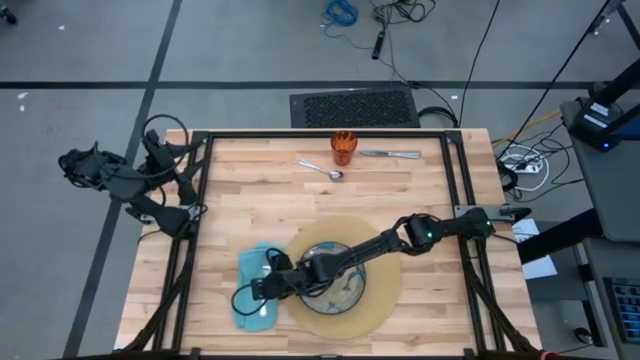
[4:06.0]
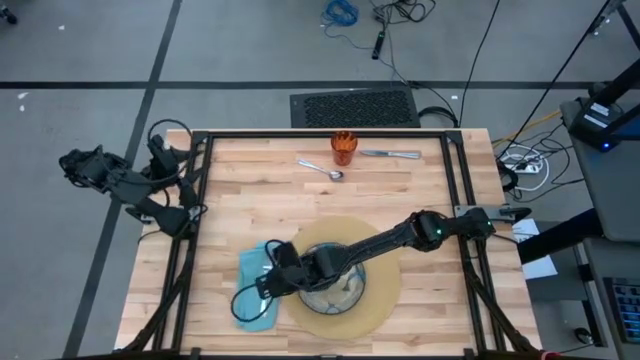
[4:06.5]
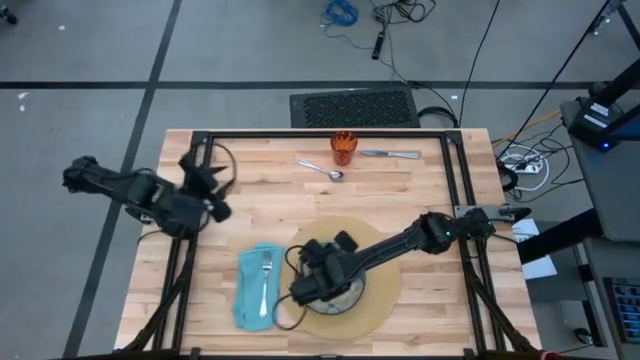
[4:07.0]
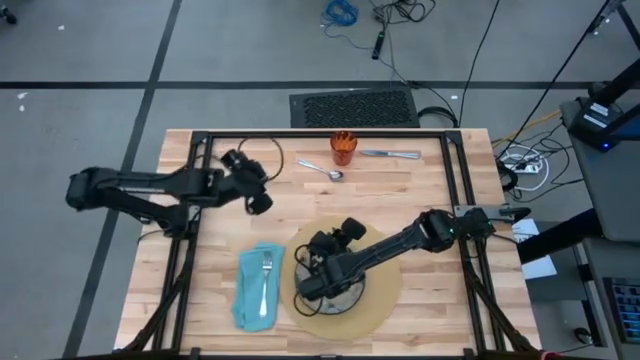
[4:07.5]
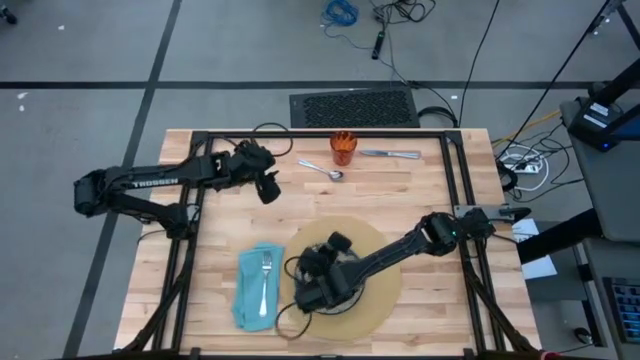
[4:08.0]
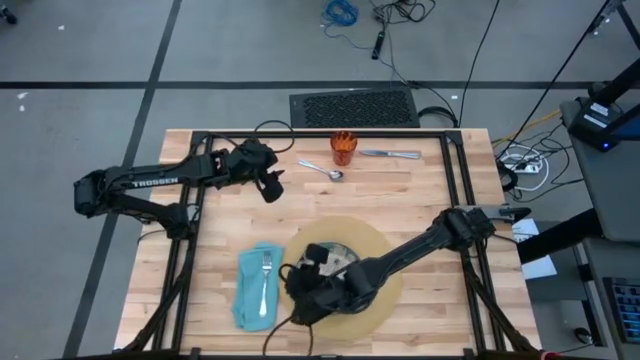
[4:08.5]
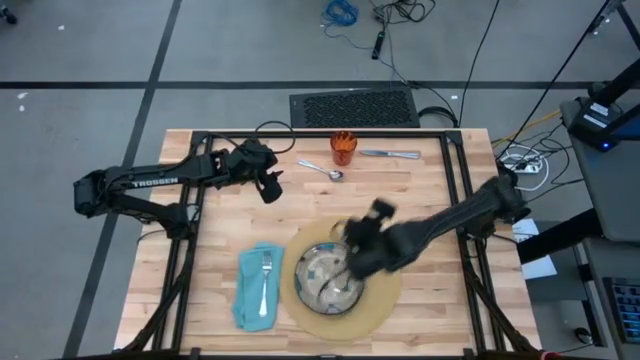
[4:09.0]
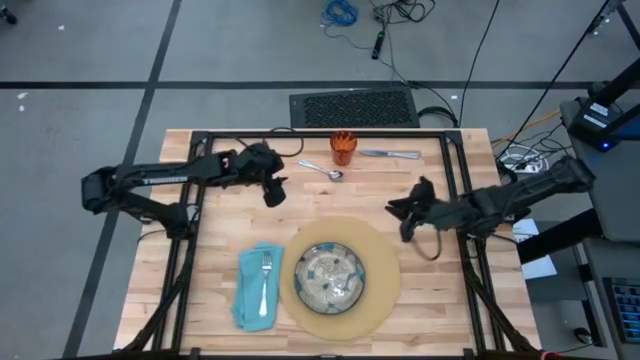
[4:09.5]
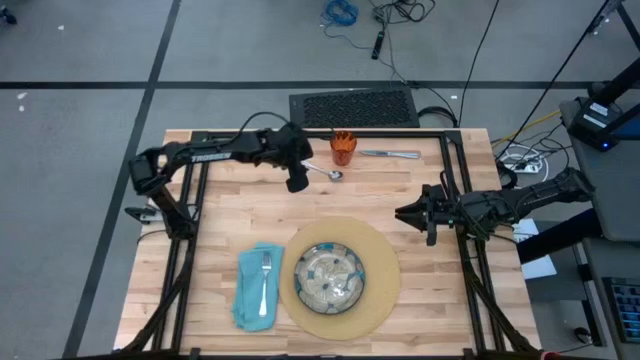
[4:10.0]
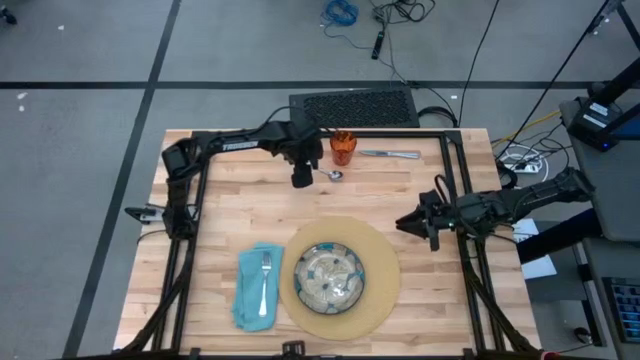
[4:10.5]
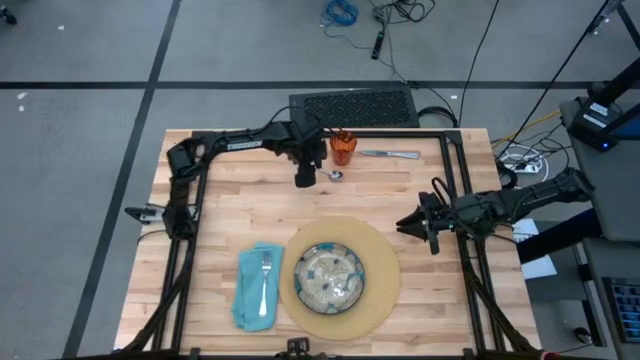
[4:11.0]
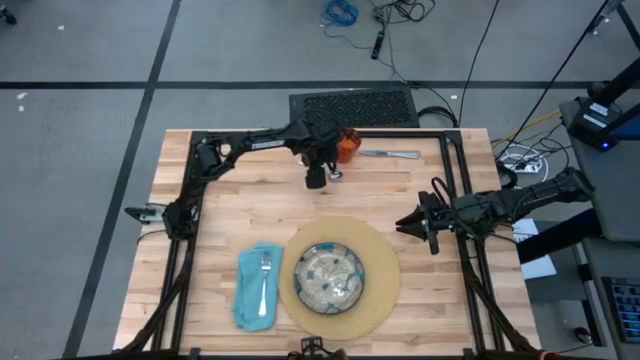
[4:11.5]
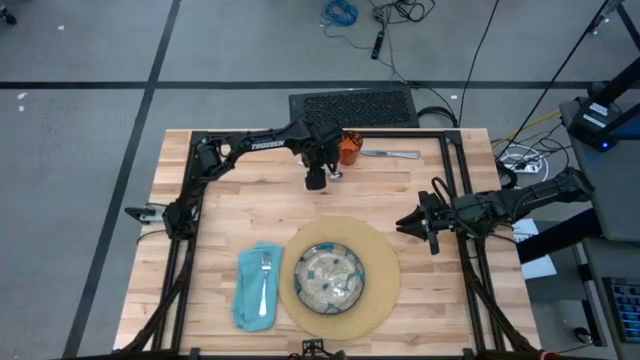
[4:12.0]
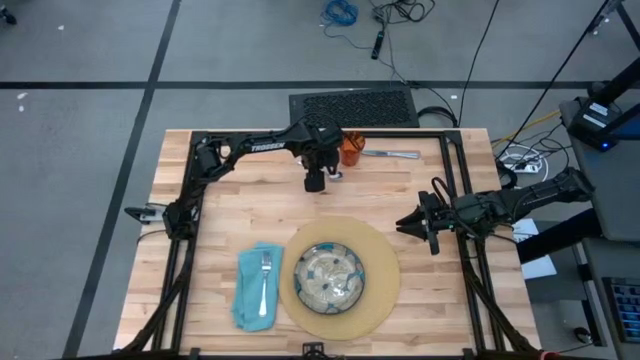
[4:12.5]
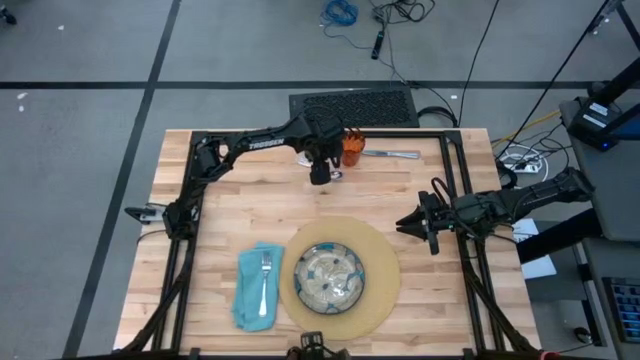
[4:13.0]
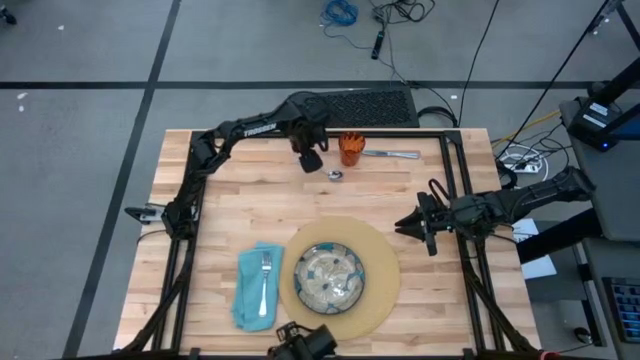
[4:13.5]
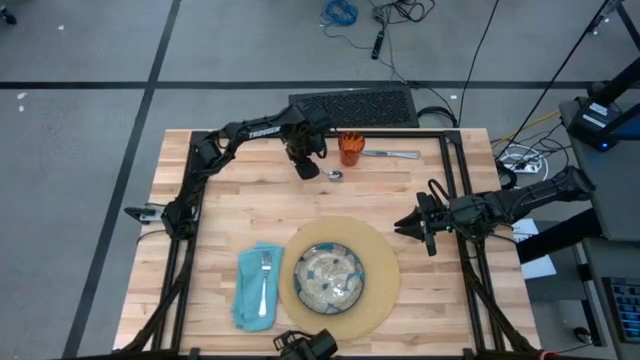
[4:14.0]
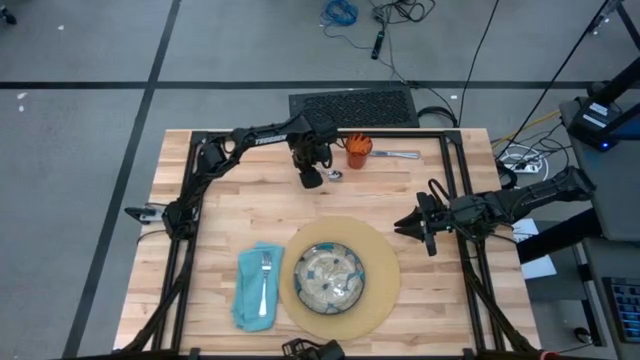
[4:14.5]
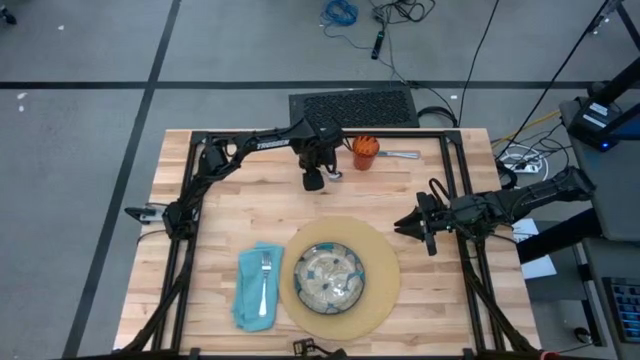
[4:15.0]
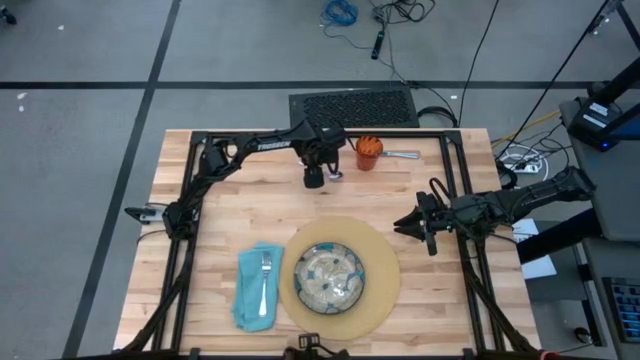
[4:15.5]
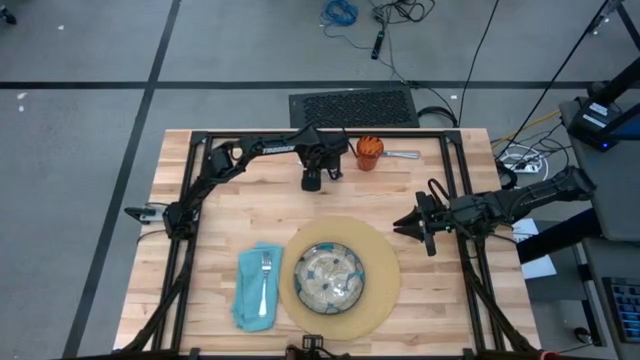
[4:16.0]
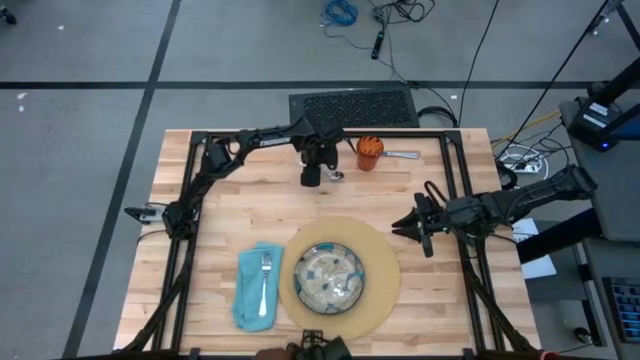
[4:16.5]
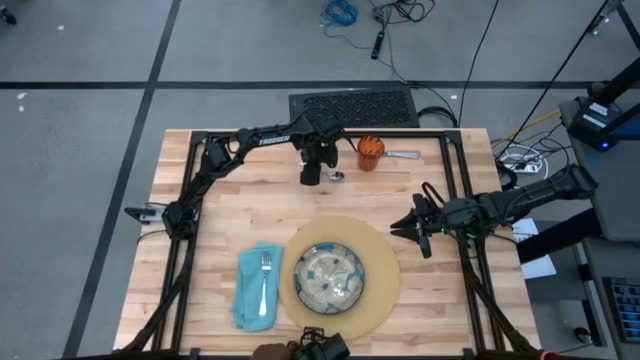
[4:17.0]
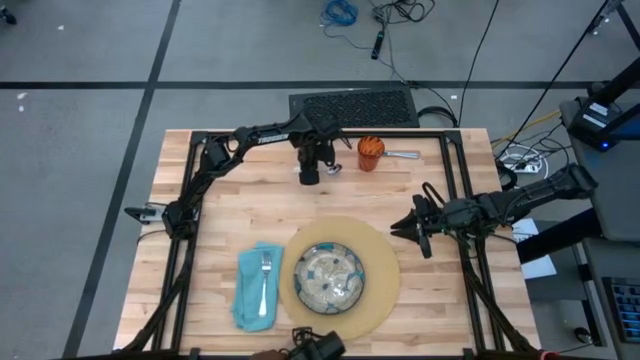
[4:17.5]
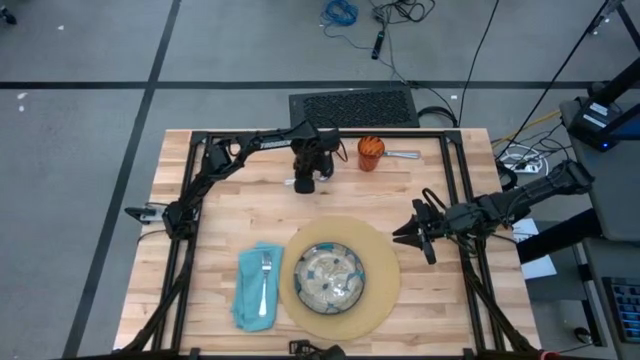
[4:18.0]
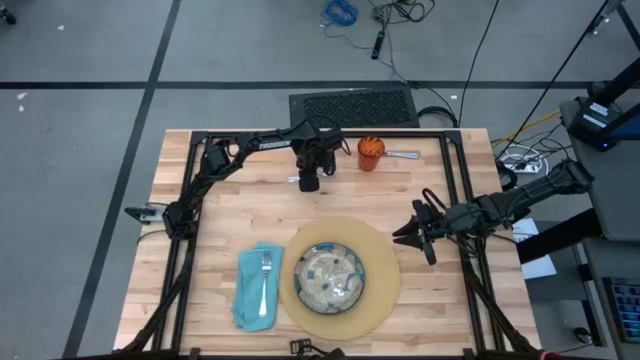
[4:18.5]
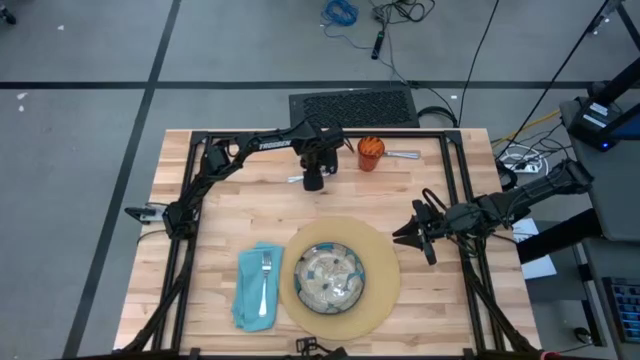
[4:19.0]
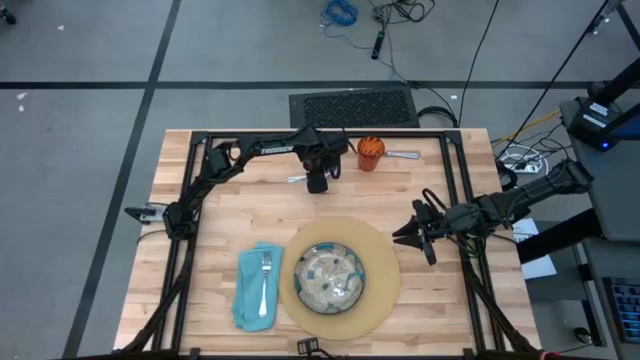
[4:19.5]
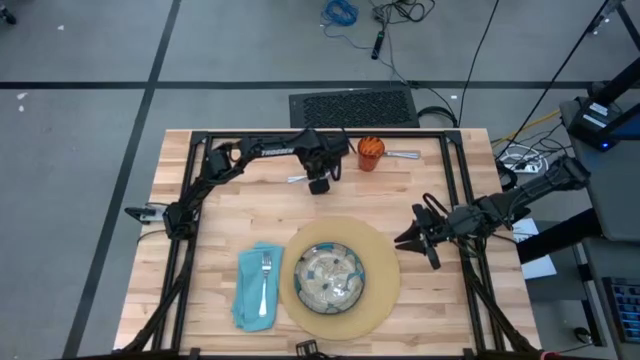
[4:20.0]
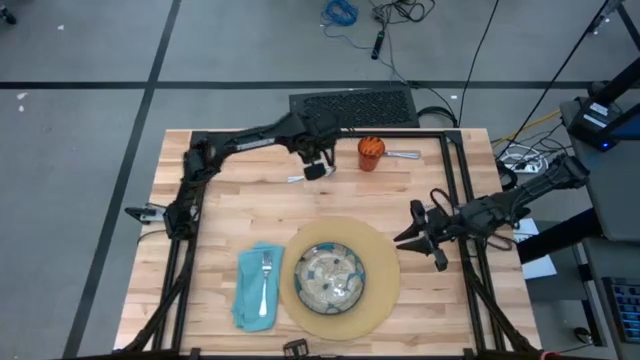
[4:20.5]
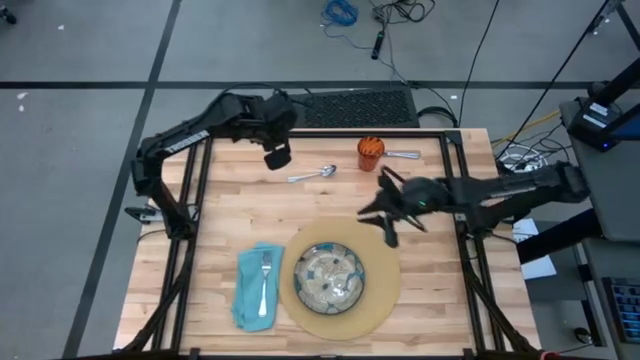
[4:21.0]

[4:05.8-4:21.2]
Task: Set table place
Move the silver spoon to the right side of the brown mat
